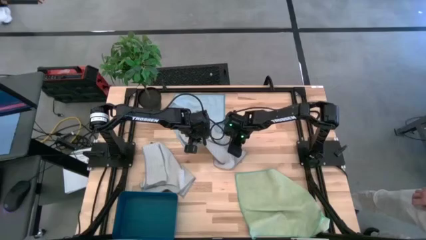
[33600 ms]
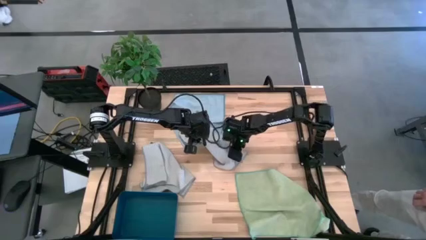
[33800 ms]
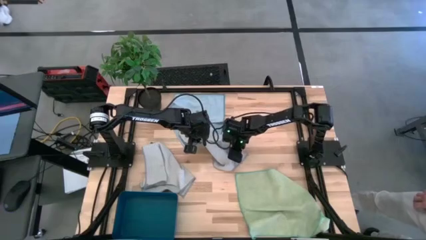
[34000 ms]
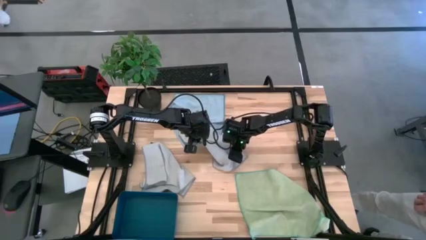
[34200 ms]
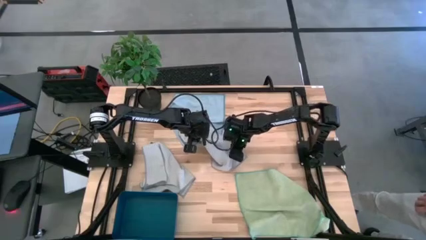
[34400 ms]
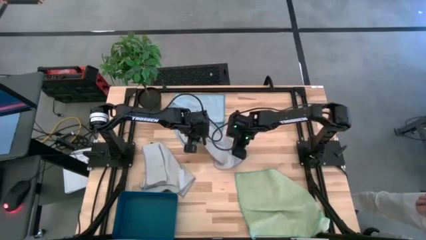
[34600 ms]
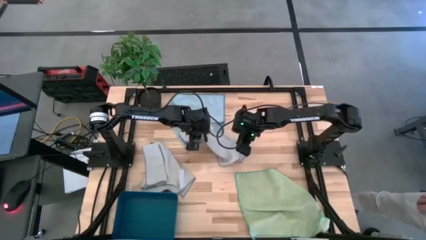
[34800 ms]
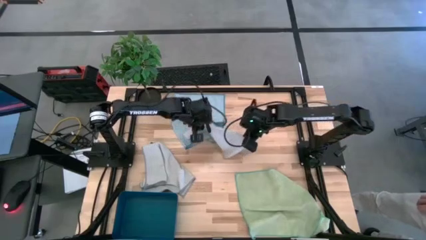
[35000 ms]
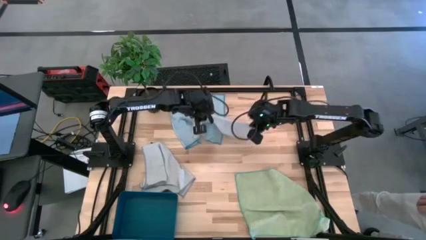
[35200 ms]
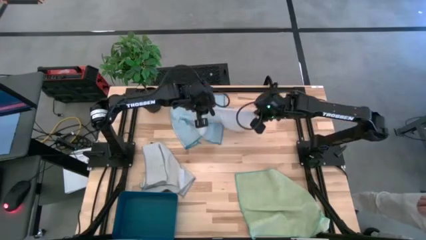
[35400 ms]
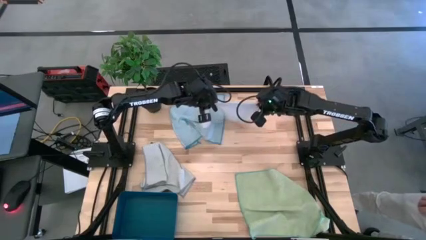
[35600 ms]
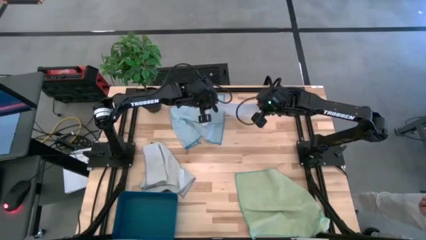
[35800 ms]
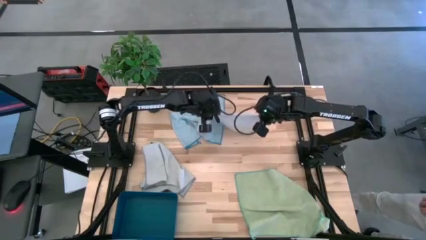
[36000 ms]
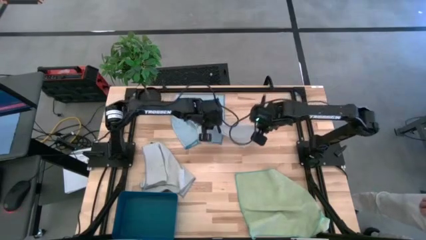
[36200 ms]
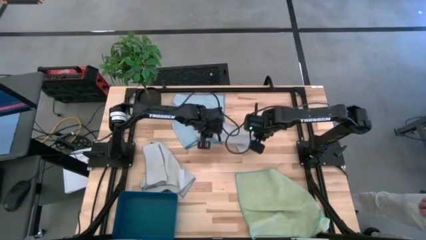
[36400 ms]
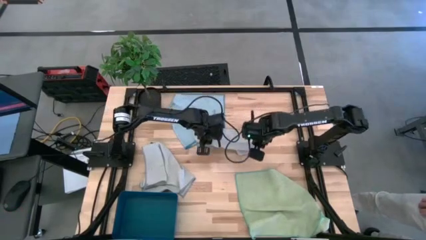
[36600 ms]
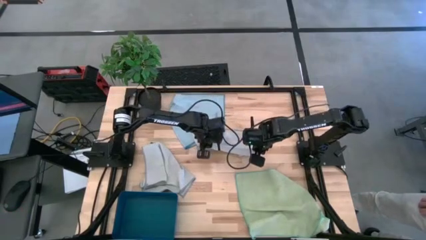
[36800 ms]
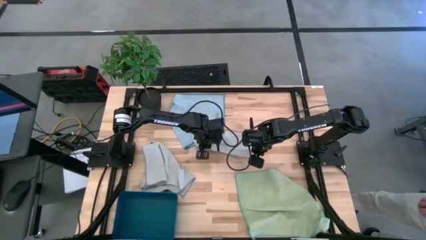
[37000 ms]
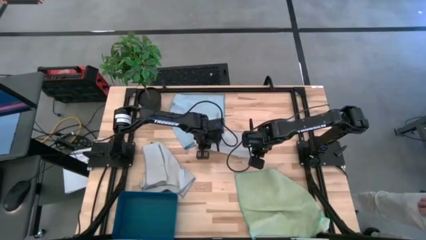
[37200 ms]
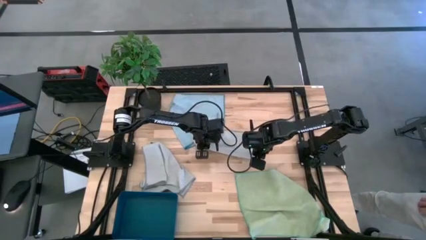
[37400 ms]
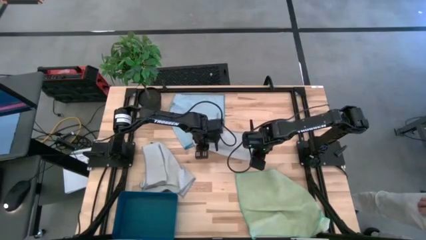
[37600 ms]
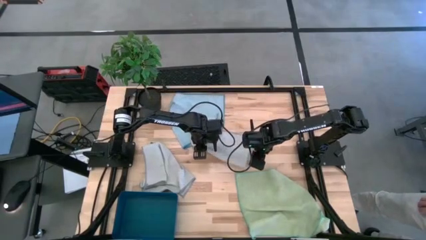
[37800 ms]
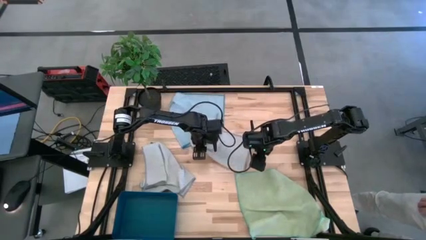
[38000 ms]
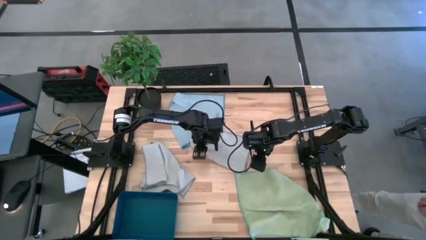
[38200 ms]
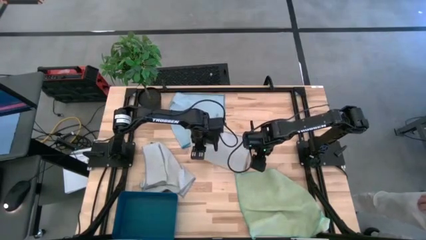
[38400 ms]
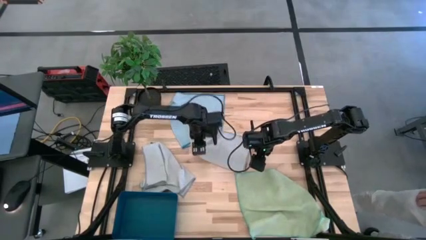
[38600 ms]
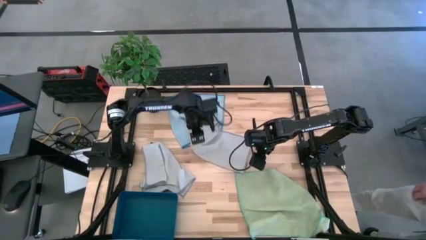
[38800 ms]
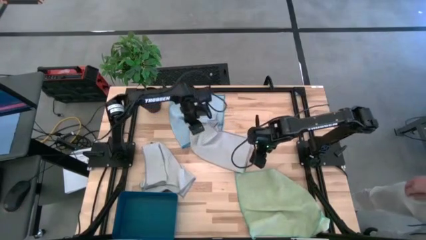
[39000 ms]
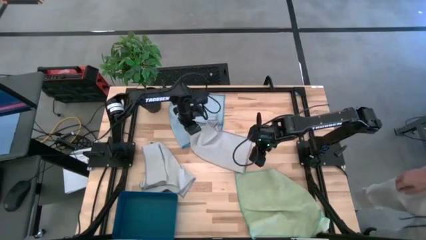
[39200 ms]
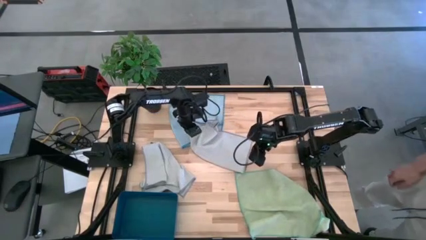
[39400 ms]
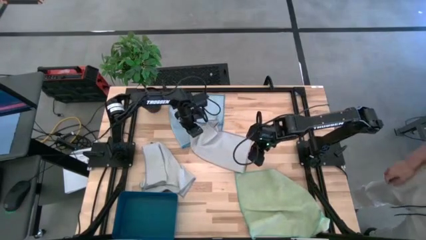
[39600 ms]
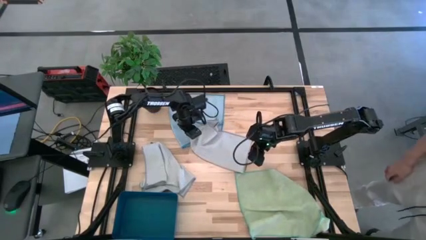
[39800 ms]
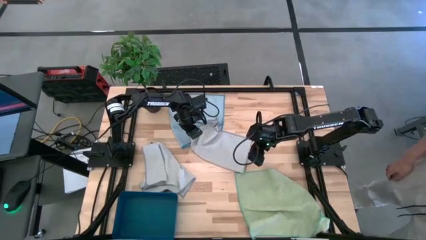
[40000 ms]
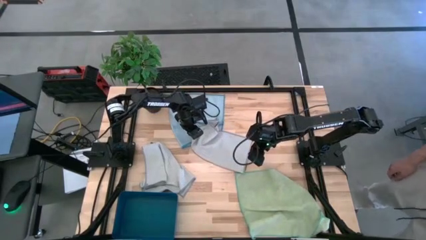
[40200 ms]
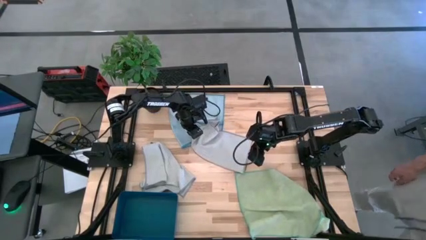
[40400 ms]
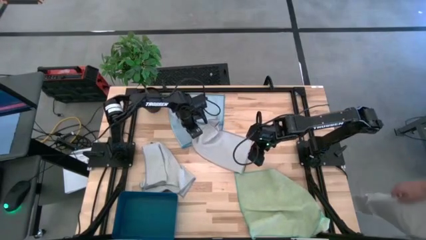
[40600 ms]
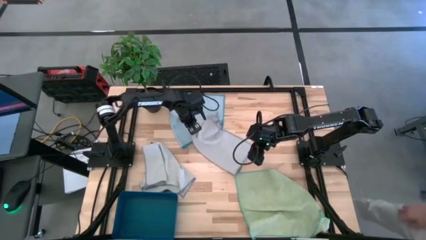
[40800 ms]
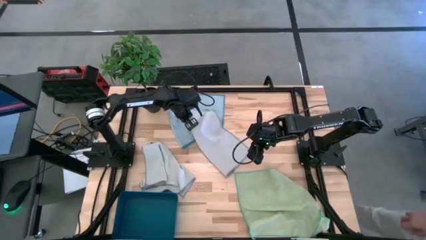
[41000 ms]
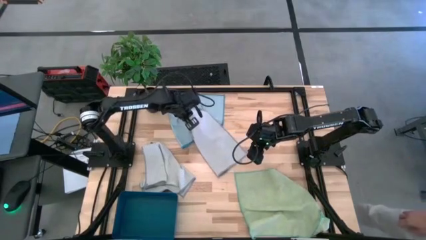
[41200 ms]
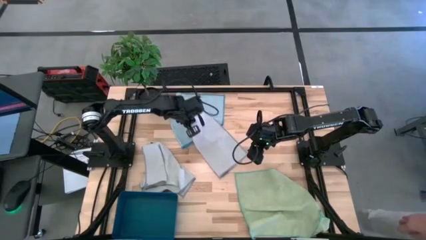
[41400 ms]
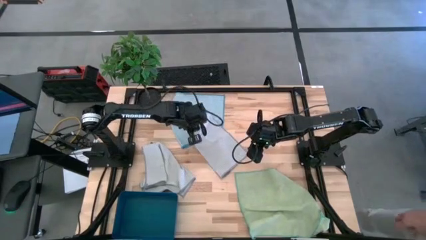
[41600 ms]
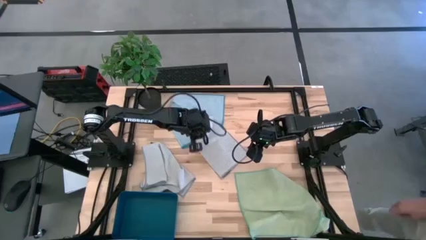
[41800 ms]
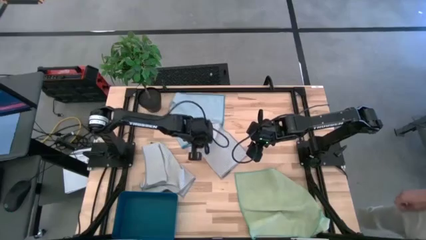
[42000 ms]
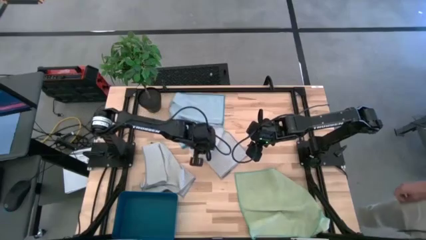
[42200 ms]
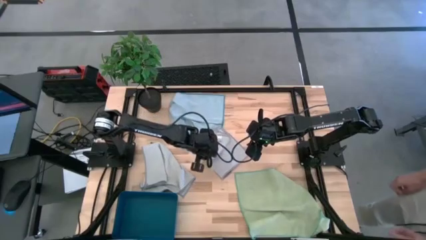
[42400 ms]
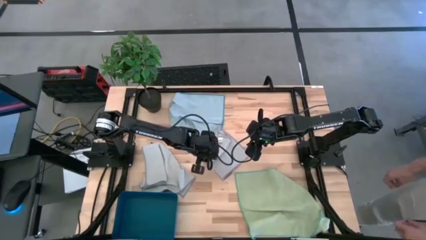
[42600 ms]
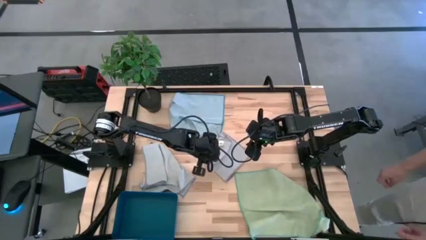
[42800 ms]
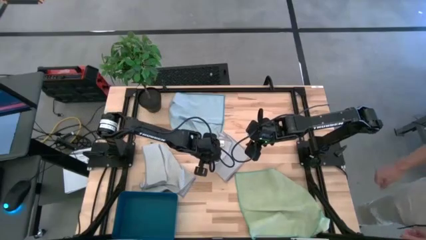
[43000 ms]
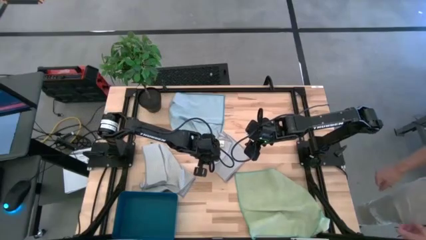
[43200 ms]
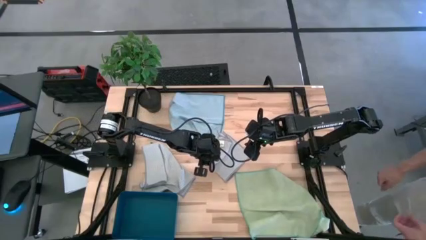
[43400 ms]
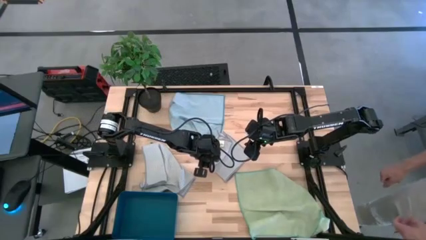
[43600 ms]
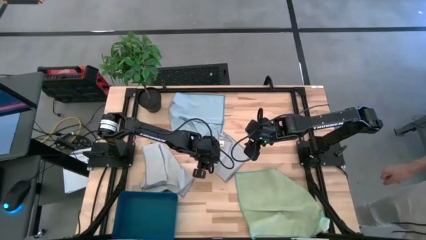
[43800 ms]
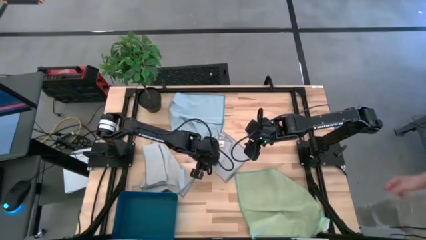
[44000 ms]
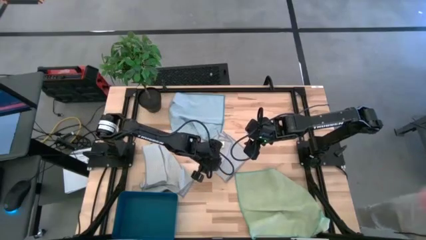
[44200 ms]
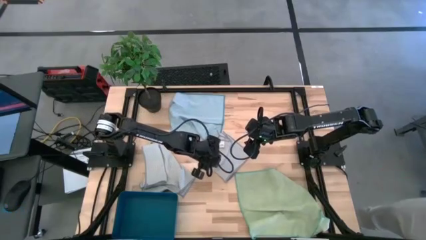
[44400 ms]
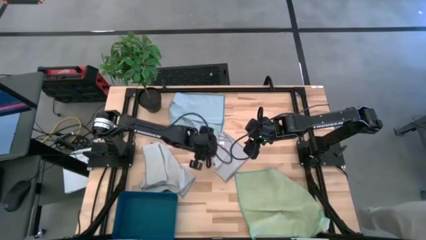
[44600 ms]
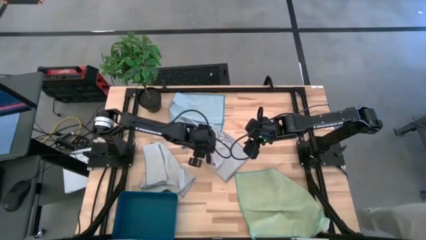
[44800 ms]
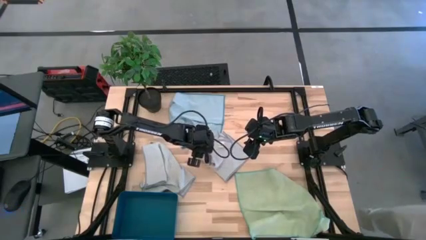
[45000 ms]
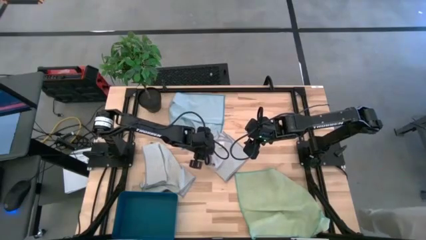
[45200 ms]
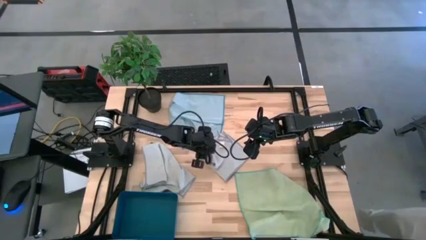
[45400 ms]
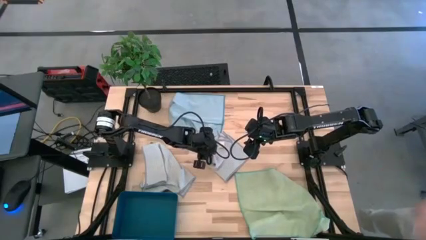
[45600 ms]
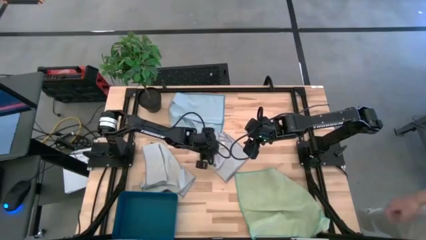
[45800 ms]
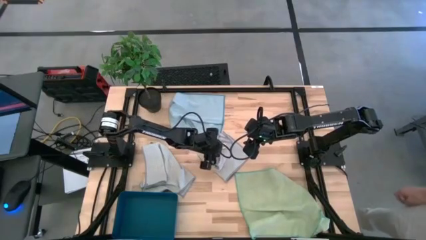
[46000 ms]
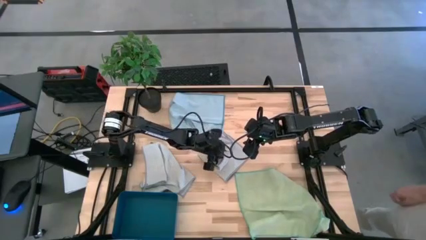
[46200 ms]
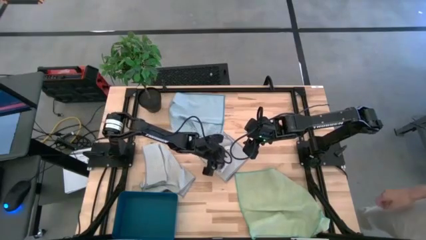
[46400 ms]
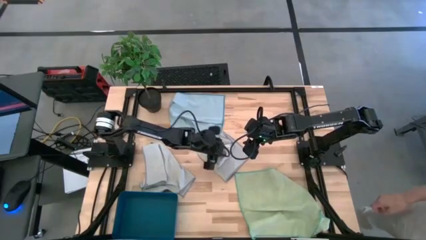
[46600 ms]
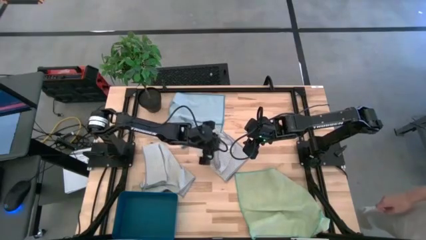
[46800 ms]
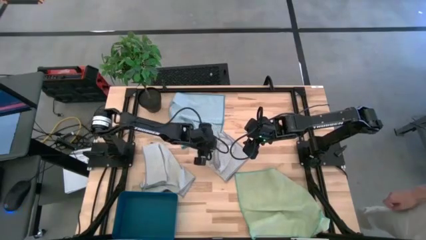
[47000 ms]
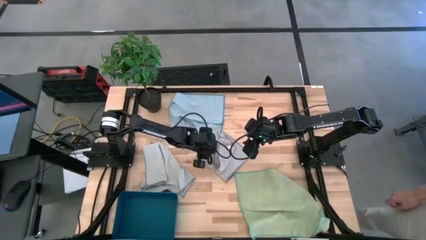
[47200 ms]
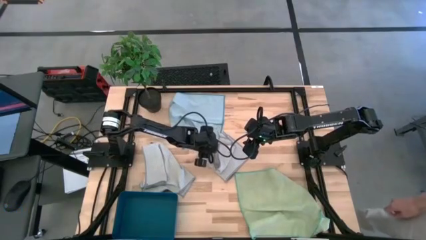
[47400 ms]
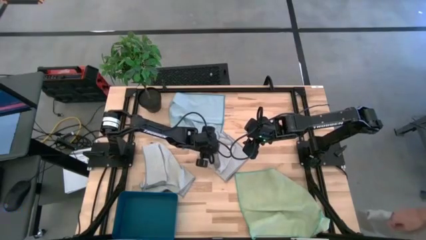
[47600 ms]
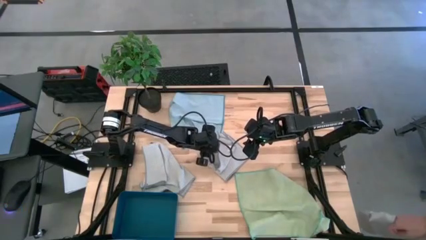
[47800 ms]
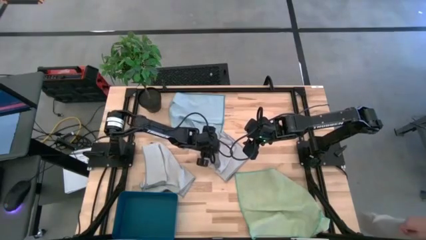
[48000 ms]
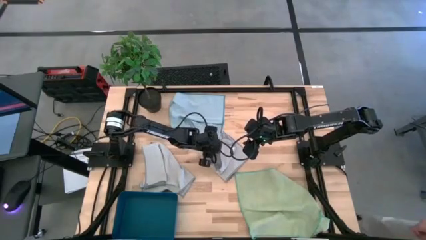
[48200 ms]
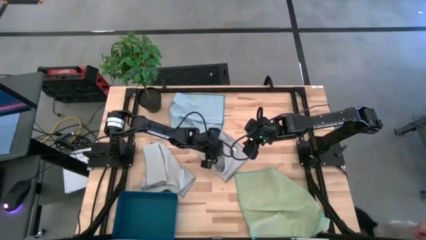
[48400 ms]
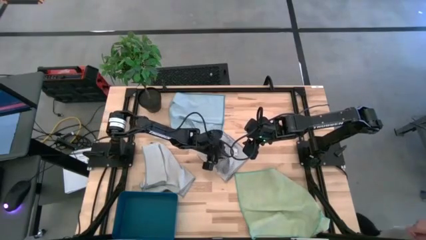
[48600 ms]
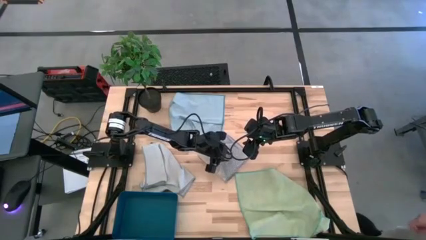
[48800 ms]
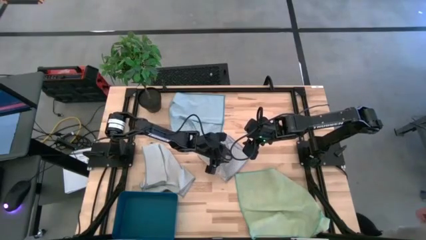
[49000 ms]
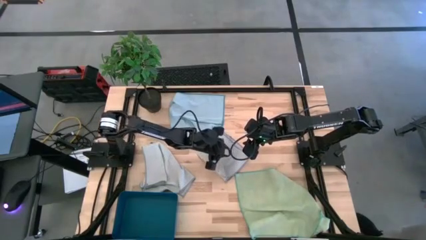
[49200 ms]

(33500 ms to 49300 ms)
Task: Fold microfiber towels
Fold the gray microfiber towel

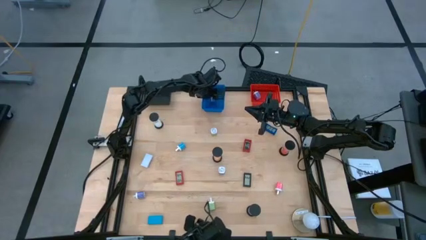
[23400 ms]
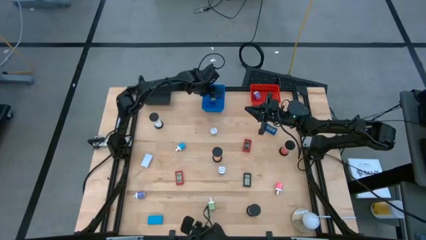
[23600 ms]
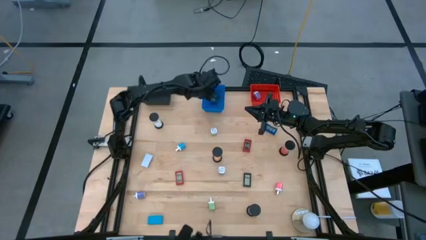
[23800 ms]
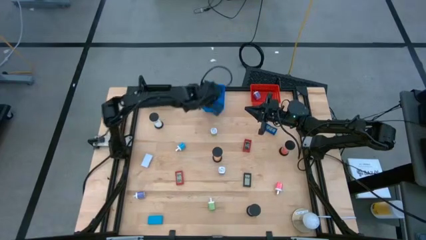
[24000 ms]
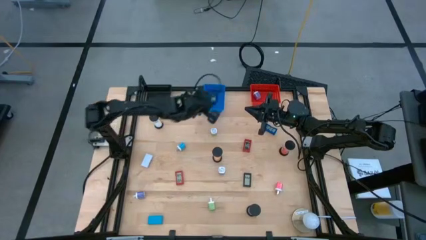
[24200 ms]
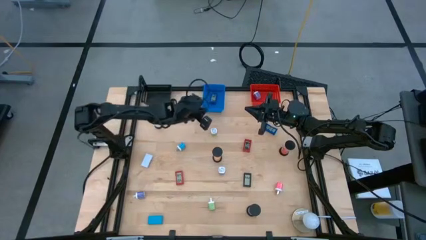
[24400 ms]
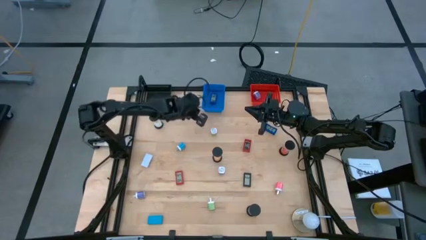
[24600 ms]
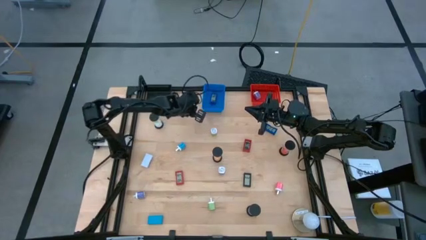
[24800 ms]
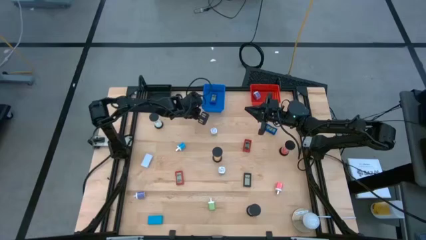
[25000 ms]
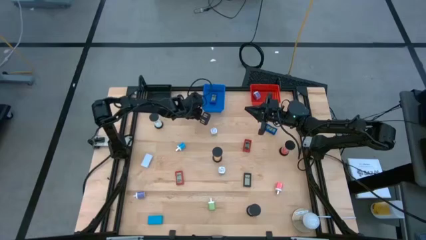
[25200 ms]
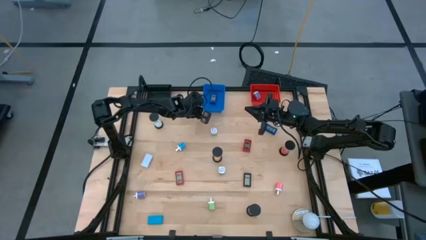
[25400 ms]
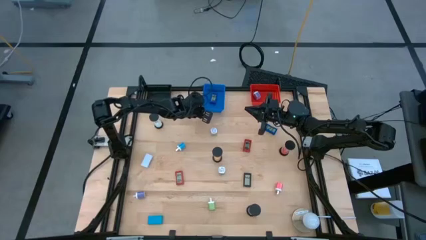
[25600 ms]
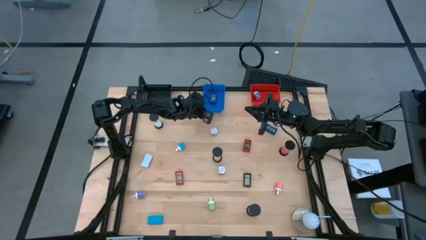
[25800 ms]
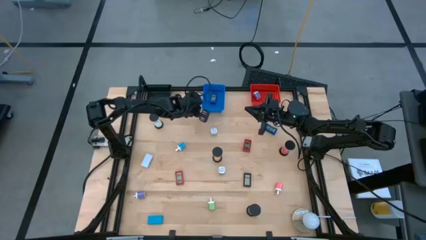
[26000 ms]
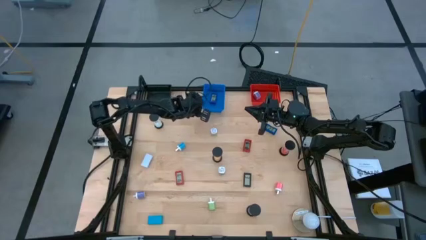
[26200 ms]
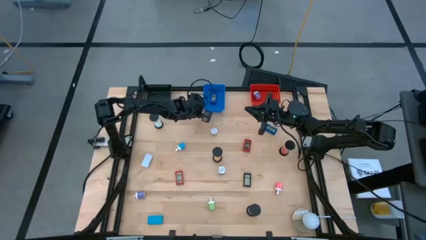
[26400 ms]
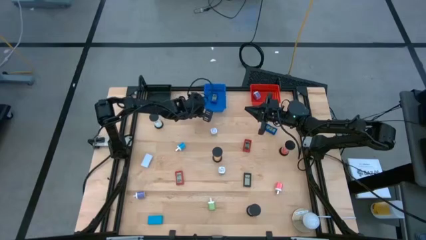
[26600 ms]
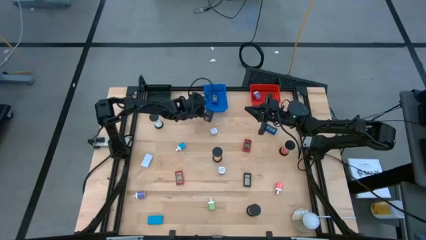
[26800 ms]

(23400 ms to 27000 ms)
Task: Pick & Place Office items
Adjust the blue basket
